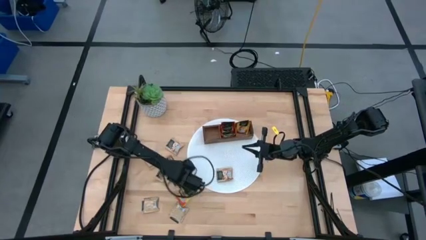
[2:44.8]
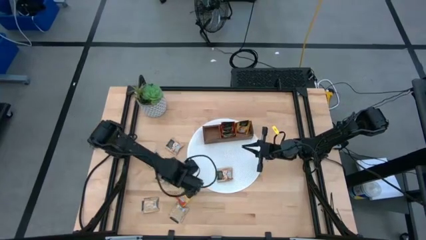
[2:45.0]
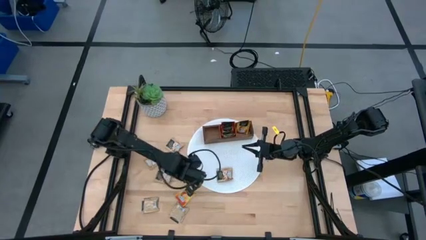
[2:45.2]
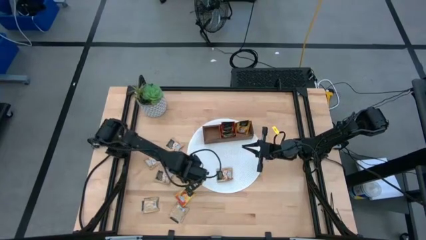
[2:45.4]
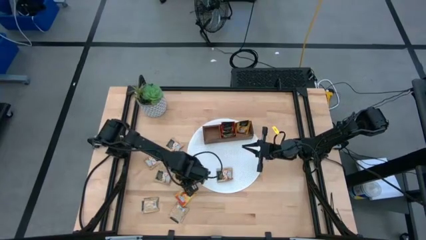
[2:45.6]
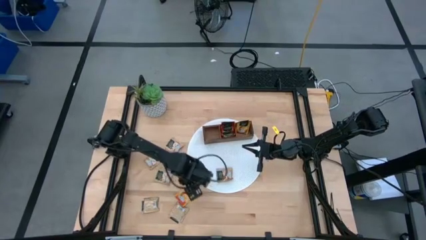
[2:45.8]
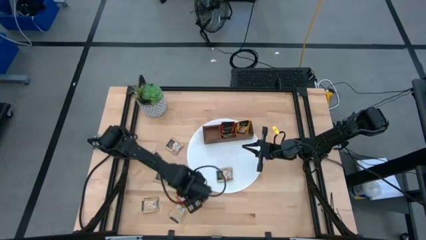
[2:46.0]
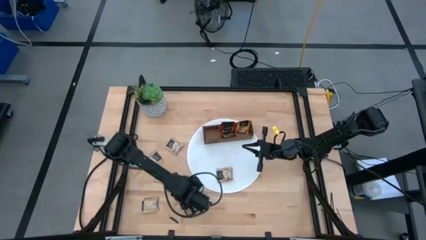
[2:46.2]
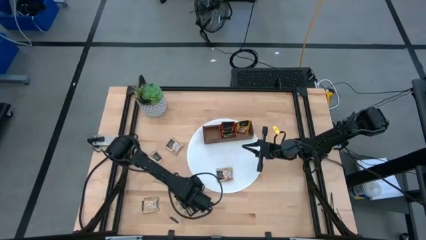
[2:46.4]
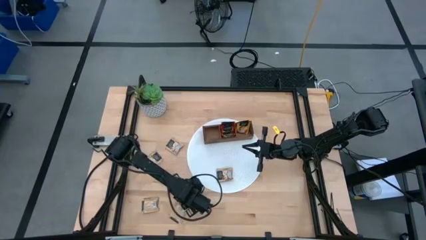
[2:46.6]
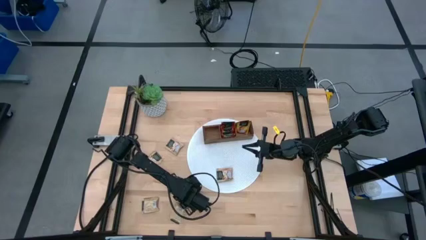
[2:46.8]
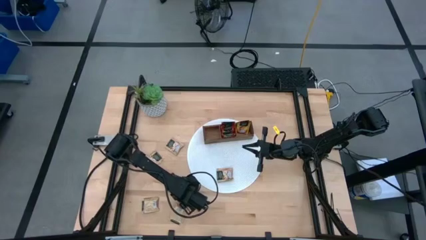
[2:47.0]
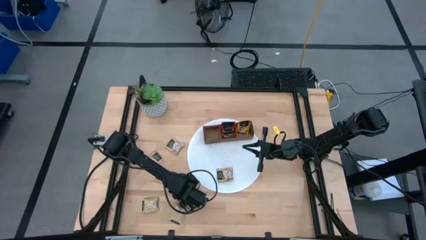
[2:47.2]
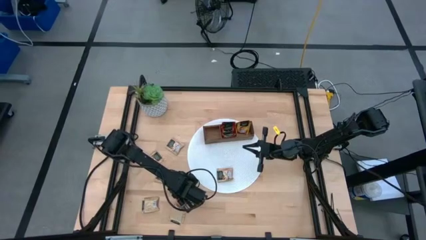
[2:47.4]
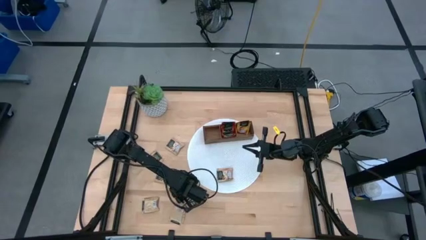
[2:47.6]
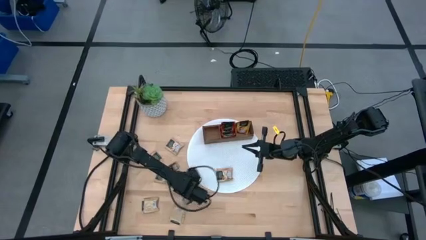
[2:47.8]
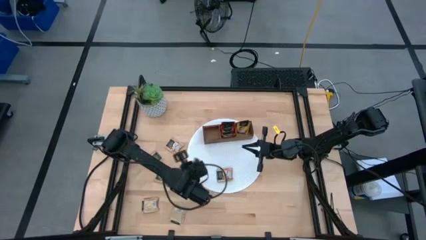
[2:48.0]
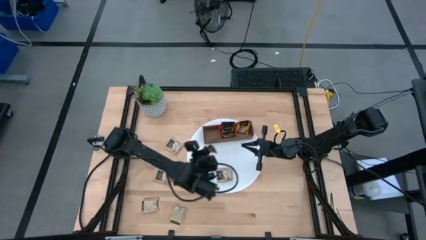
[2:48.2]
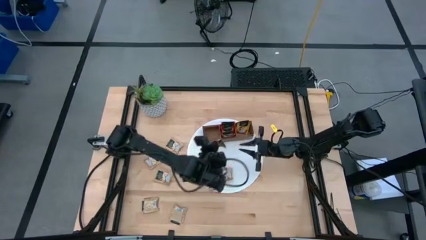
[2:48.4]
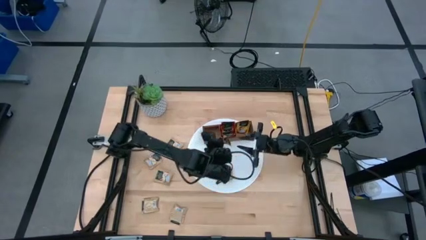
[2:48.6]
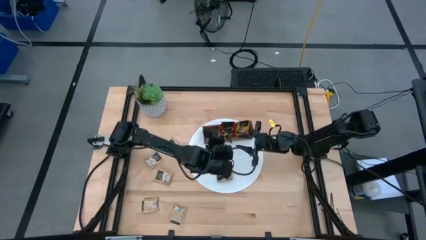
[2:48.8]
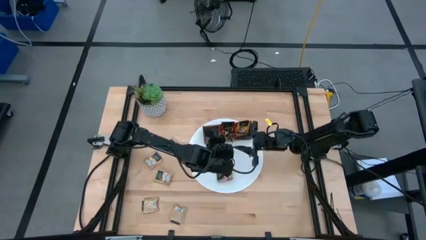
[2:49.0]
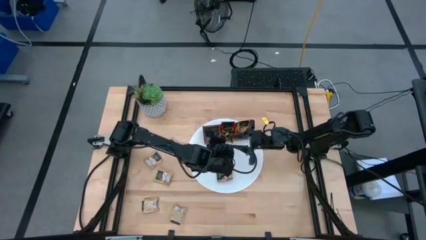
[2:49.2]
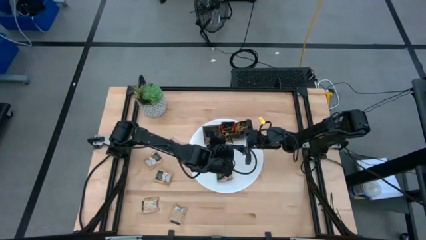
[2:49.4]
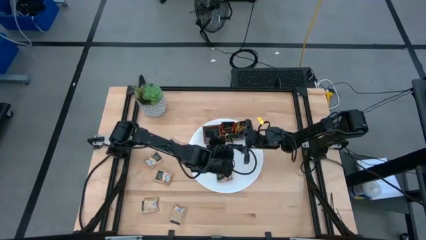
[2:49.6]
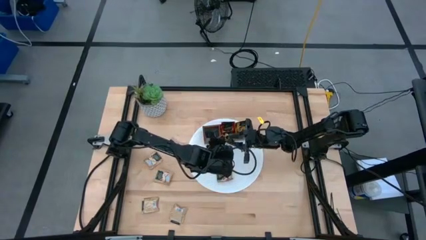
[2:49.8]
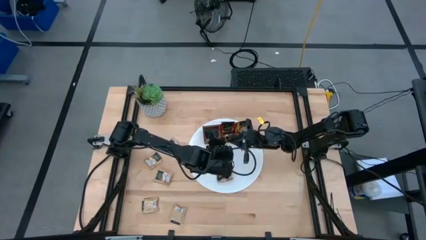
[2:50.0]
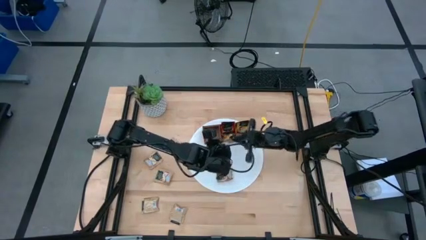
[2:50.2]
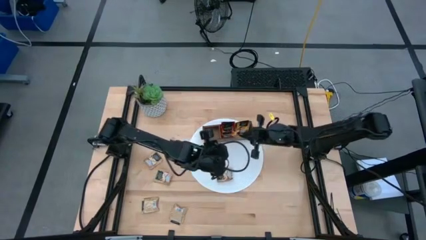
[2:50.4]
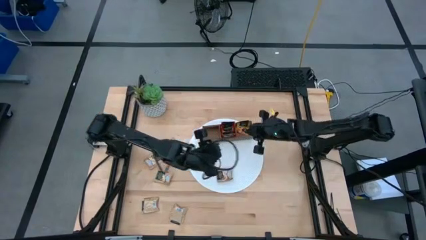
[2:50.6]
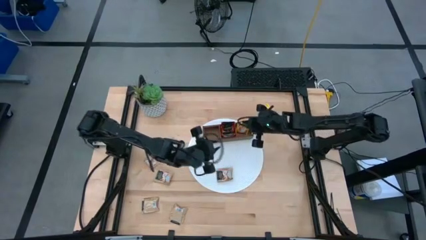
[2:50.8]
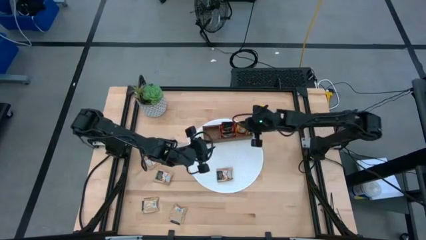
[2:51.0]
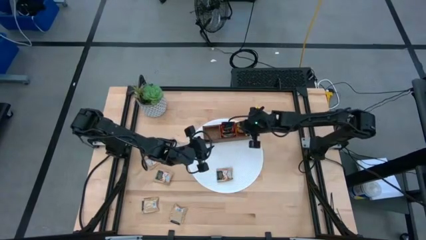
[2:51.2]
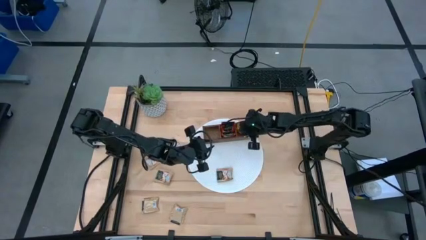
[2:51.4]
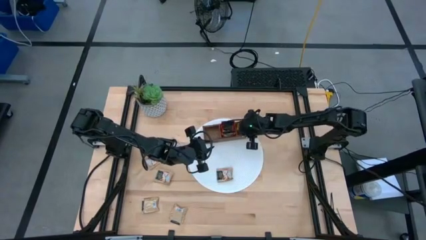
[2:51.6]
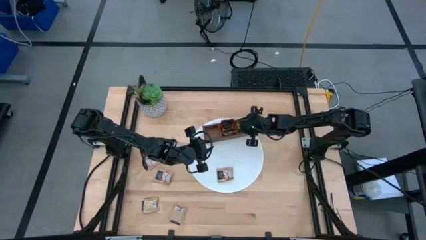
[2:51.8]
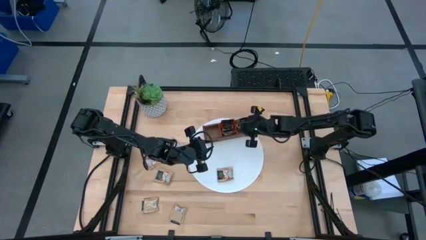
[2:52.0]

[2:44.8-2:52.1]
Task: Pick & Place Tea
Put the yellow tea bag into the right section of the wooden organizer

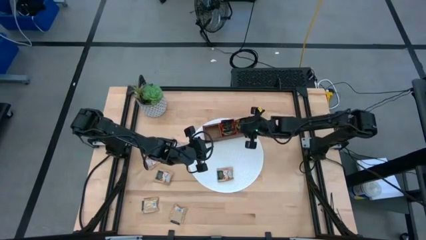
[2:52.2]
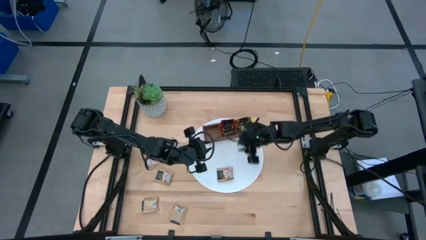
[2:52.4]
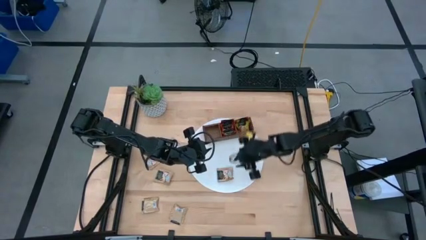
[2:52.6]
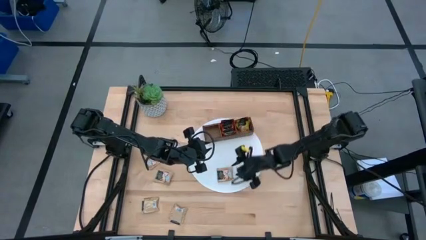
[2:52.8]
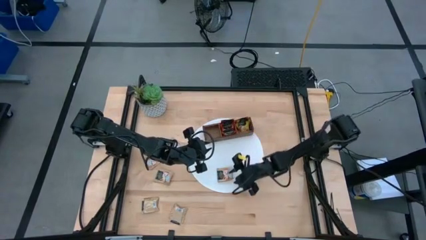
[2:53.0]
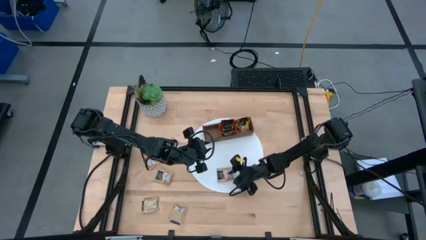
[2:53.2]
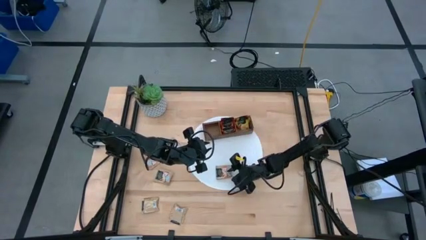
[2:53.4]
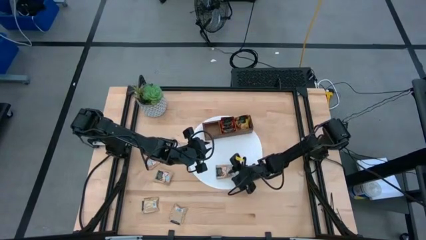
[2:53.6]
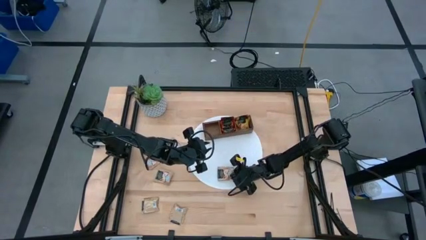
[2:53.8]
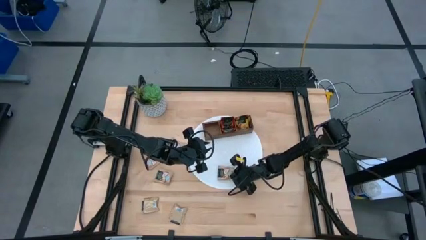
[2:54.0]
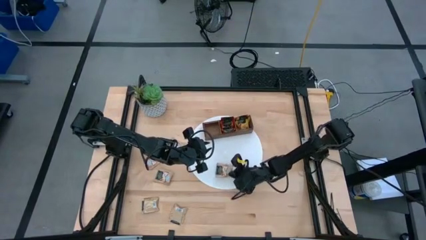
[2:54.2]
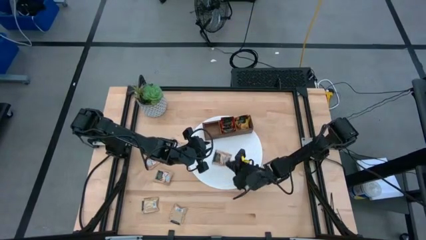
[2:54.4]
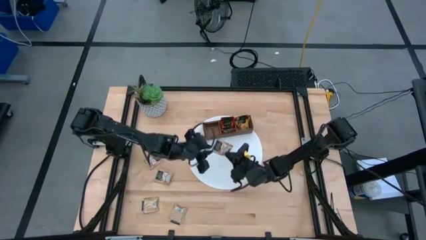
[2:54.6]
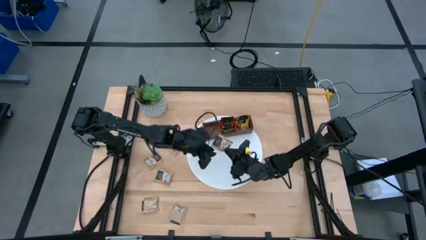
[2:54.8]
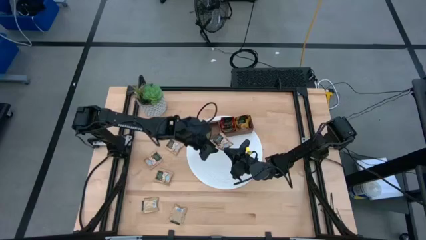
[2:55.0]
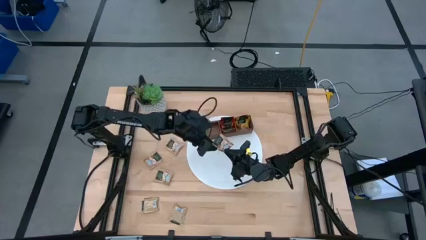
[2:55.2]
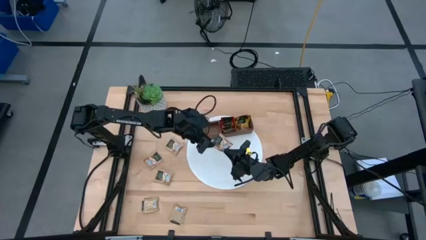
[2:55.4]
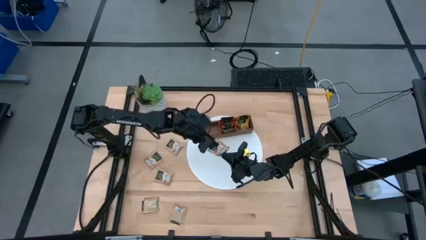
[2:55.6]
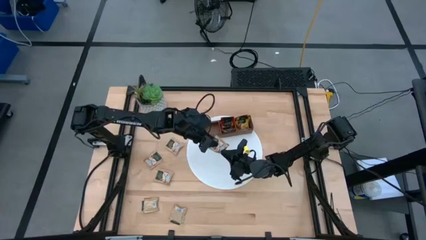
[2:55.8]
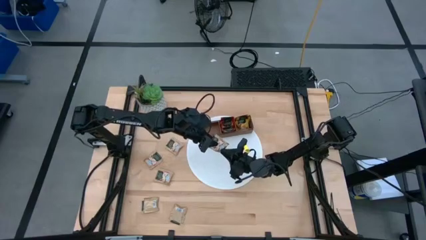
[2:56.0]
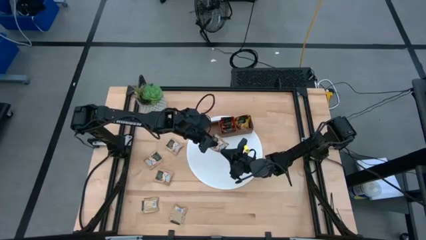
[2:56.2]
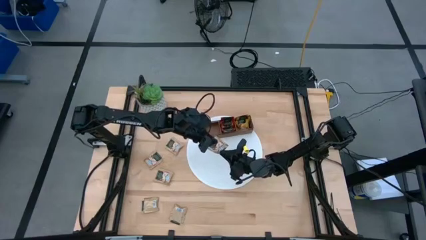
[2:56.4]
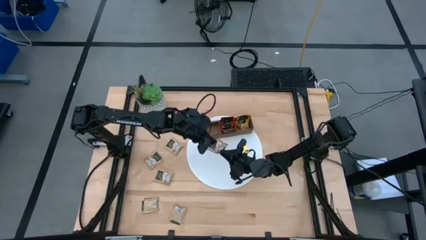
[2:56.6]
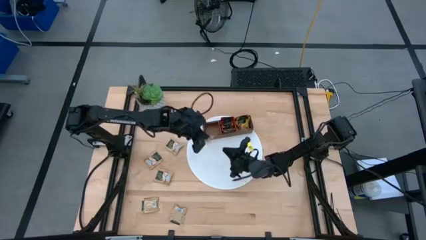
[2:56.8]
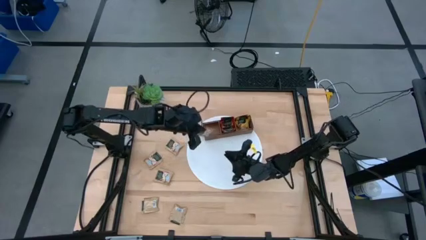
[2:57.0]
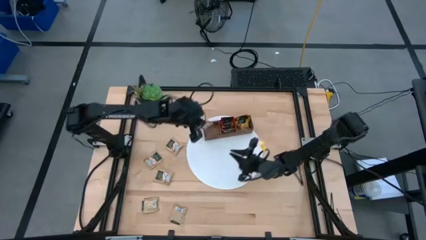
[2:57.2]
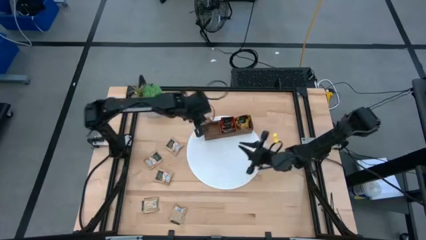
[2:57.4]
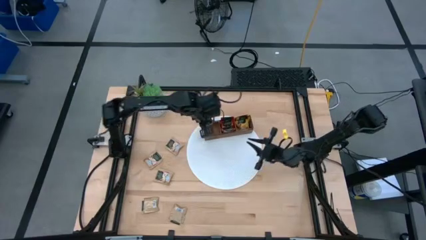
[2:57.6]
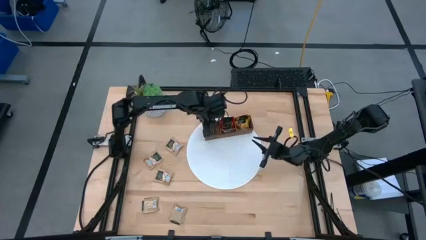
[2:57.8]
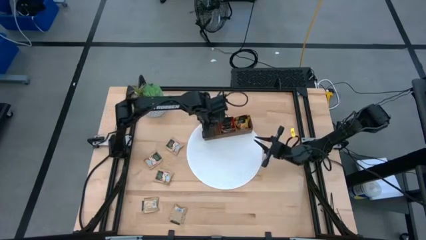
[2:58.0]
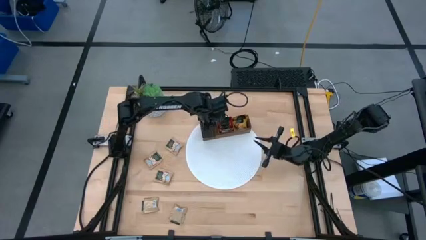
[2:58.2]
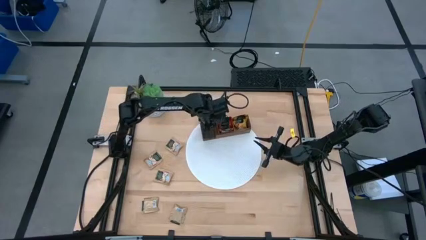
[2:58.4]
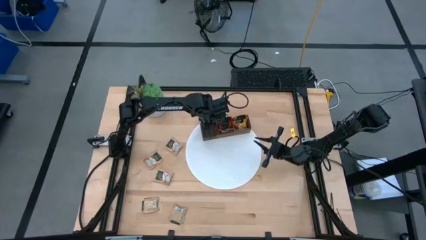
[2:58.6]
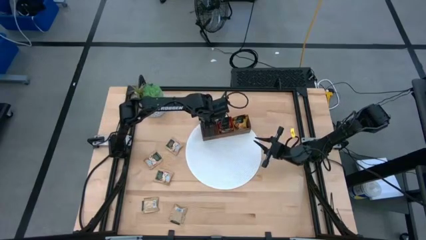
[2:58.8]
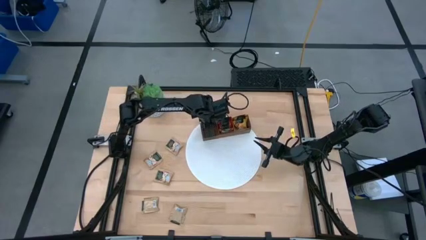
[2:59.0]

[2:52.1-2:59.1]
Put the brown tea bag into the left section of the wooden organizer

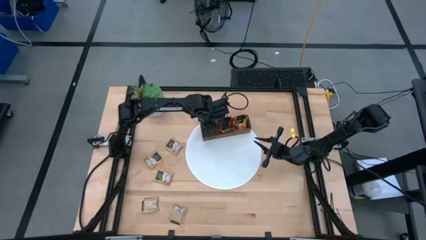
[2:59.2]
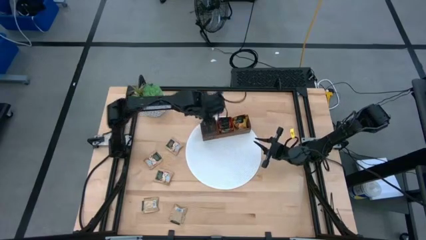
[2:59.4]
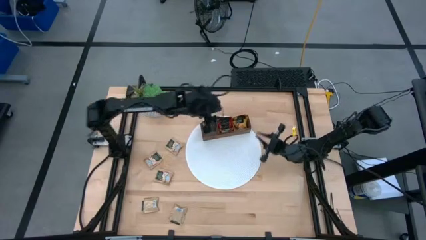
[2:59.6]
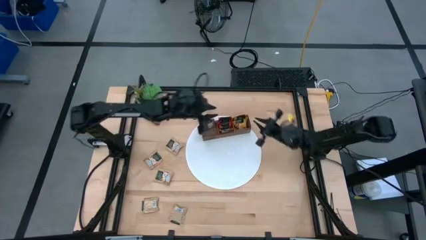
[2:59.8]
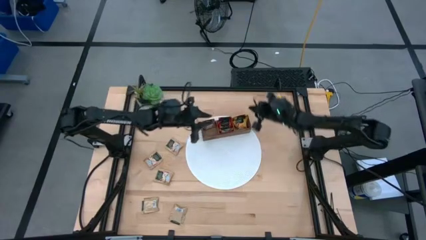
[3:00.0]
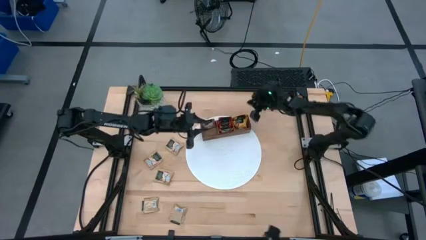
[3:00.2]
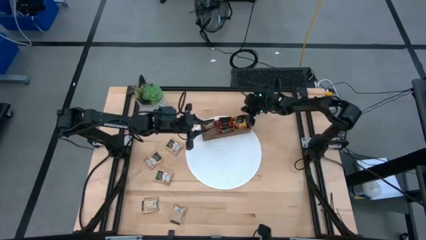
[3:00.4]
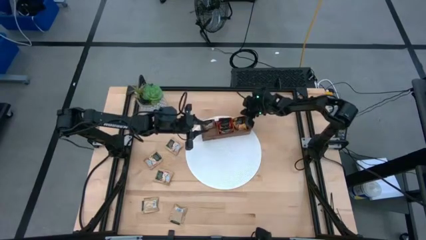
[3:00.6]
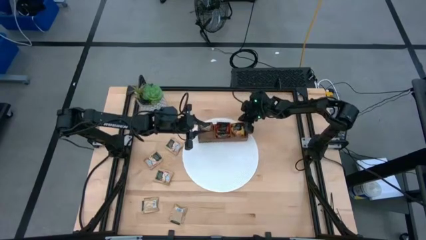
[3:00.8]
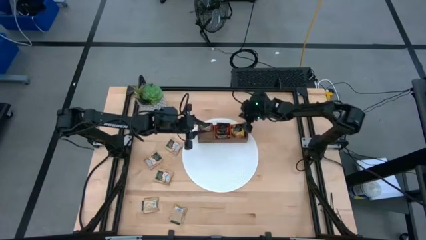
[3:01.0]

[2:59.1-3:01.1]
Adjust the wooden organizer
